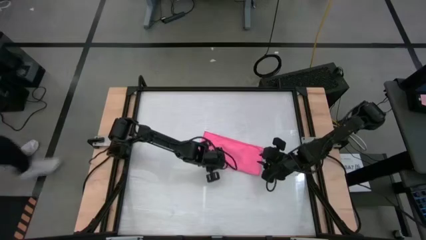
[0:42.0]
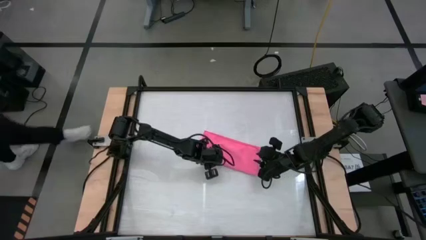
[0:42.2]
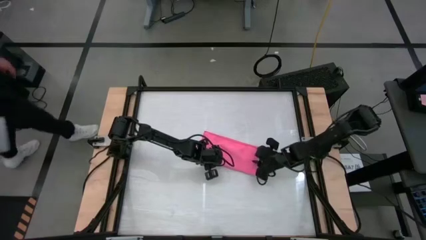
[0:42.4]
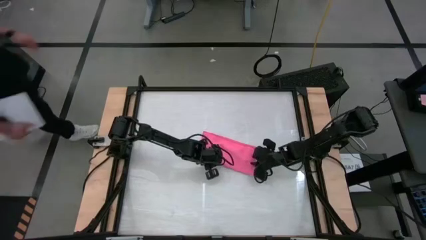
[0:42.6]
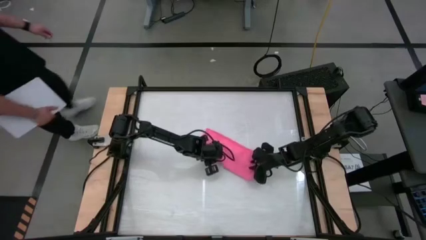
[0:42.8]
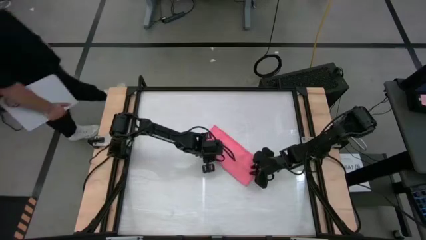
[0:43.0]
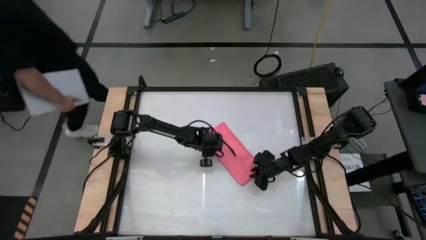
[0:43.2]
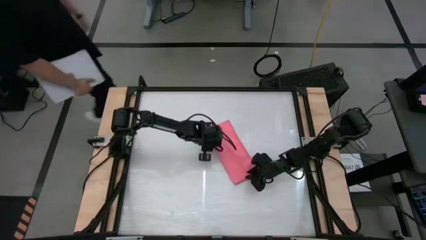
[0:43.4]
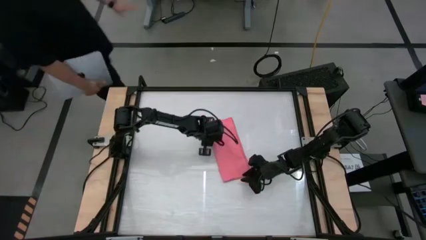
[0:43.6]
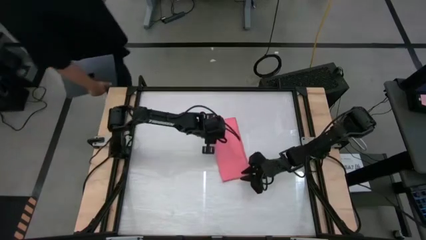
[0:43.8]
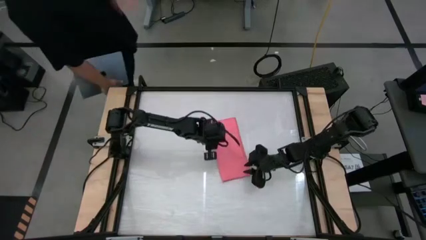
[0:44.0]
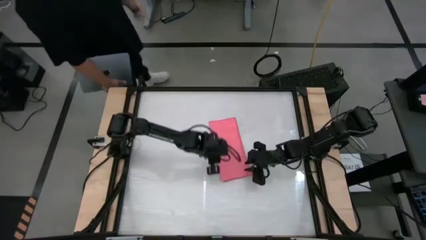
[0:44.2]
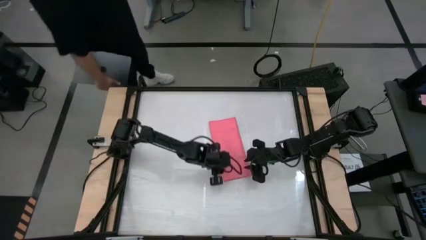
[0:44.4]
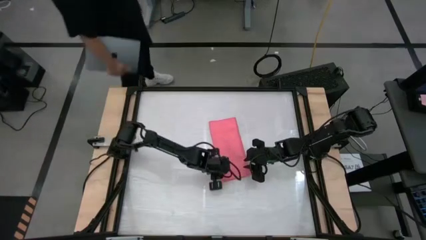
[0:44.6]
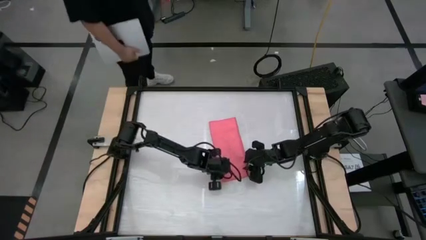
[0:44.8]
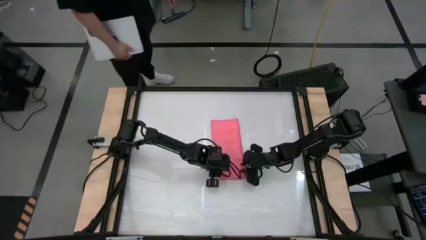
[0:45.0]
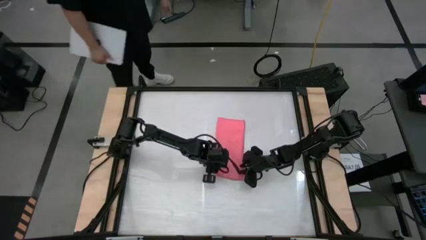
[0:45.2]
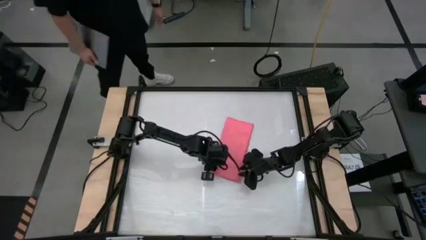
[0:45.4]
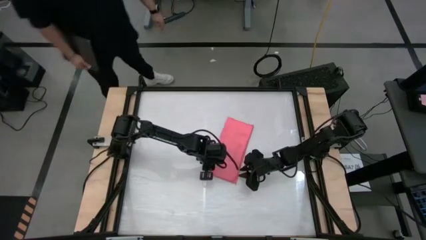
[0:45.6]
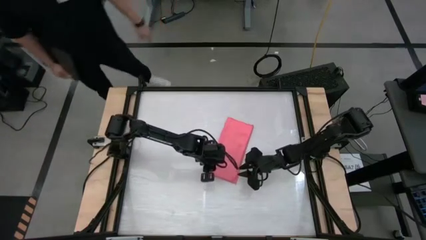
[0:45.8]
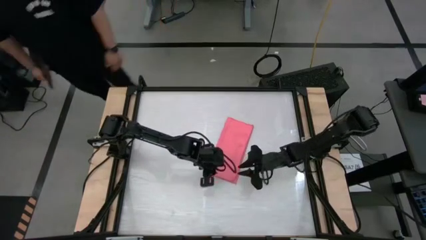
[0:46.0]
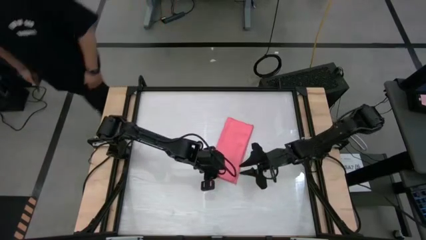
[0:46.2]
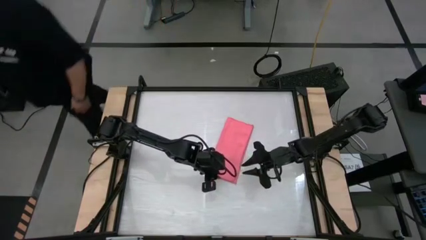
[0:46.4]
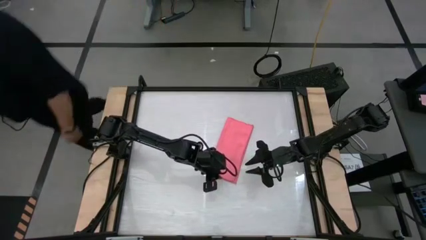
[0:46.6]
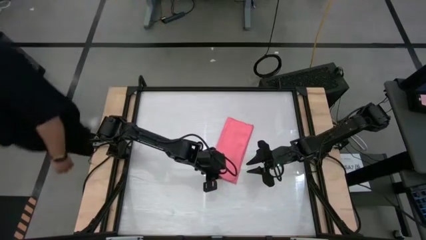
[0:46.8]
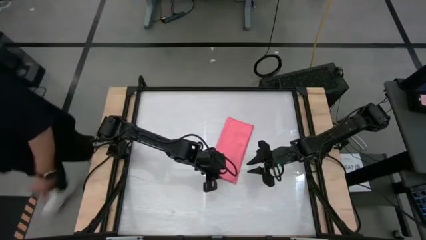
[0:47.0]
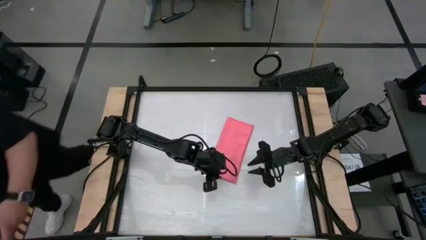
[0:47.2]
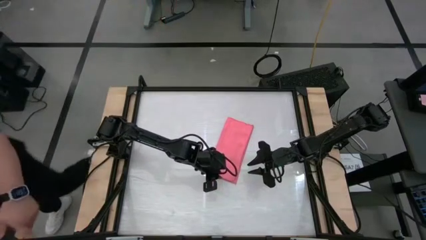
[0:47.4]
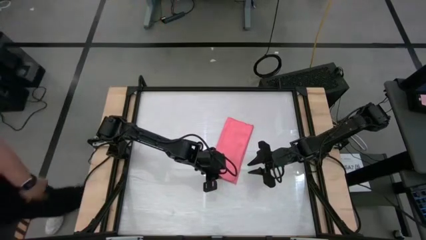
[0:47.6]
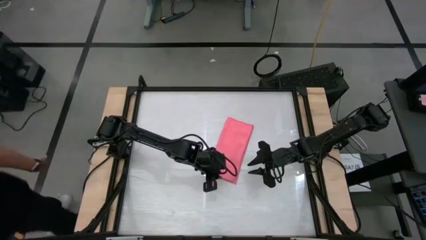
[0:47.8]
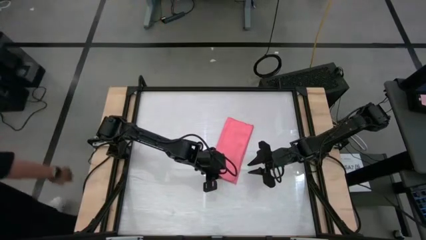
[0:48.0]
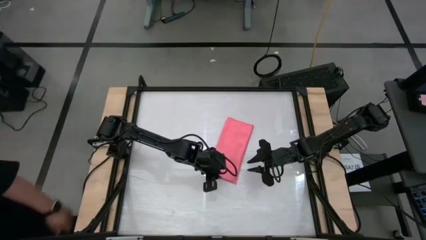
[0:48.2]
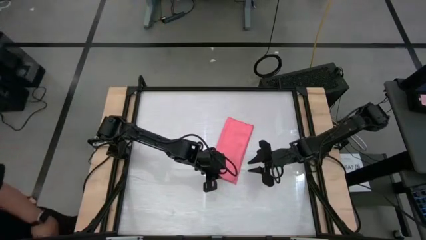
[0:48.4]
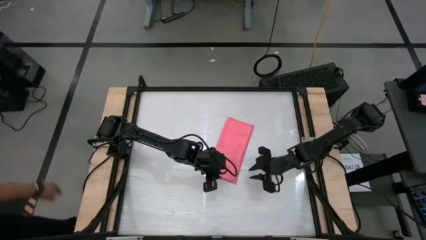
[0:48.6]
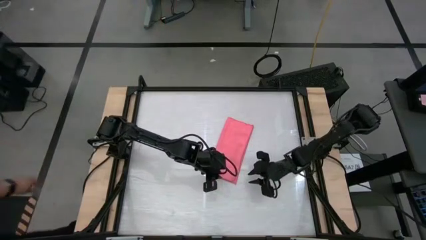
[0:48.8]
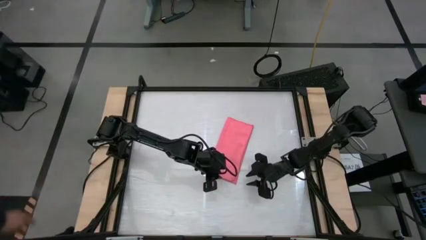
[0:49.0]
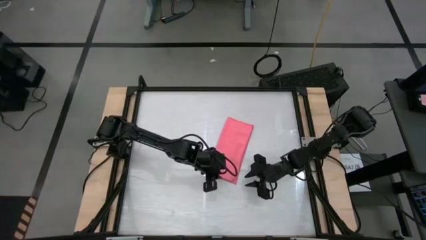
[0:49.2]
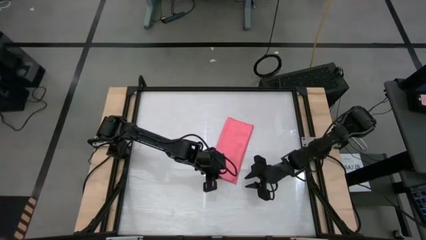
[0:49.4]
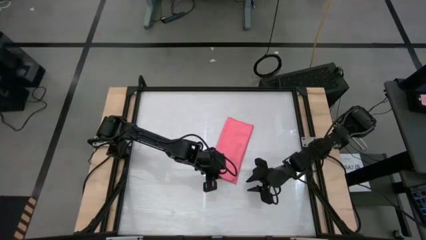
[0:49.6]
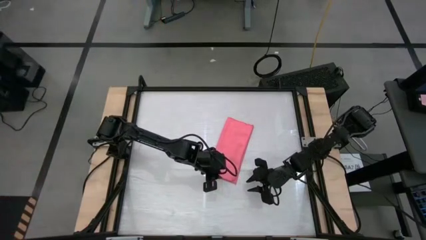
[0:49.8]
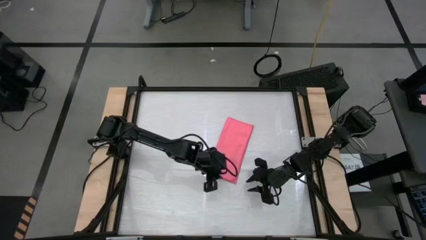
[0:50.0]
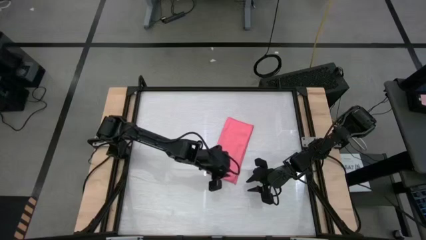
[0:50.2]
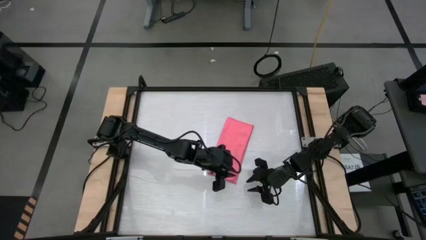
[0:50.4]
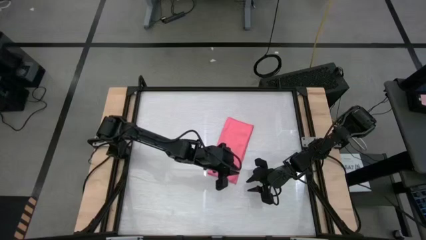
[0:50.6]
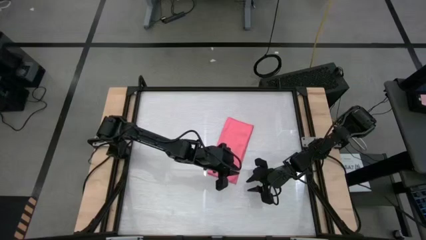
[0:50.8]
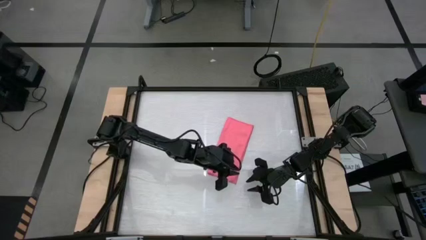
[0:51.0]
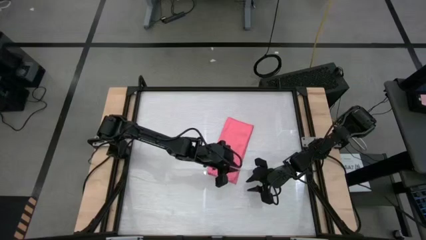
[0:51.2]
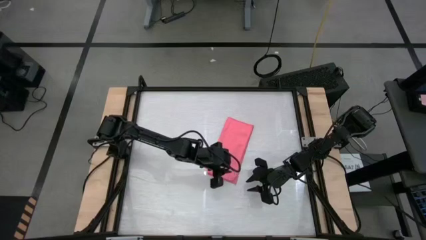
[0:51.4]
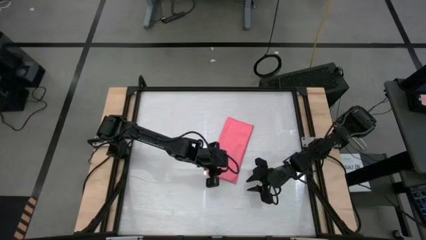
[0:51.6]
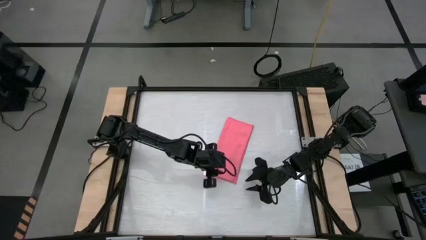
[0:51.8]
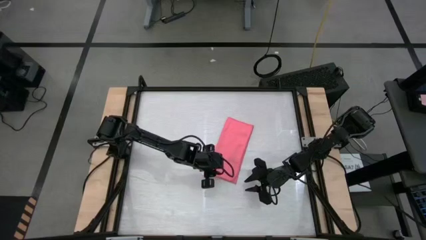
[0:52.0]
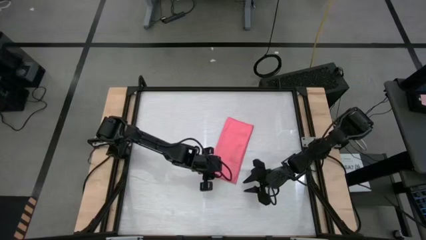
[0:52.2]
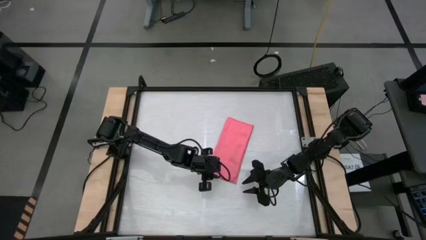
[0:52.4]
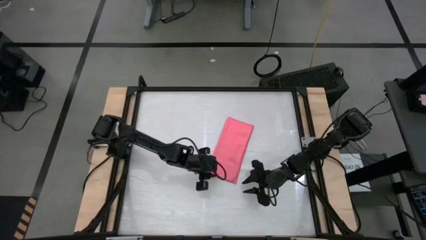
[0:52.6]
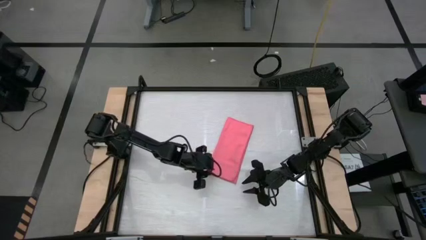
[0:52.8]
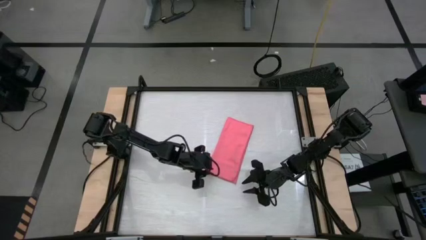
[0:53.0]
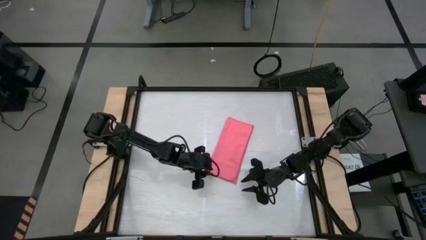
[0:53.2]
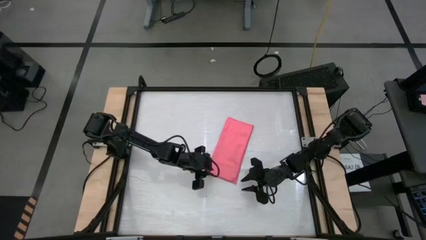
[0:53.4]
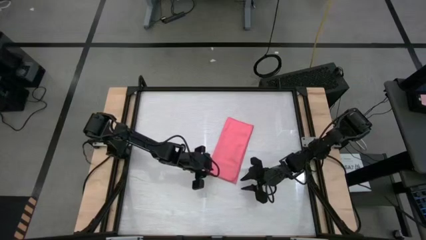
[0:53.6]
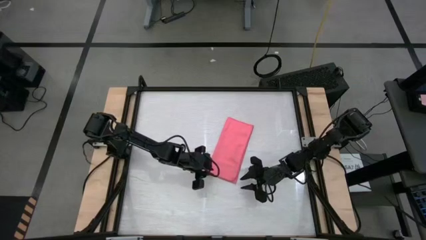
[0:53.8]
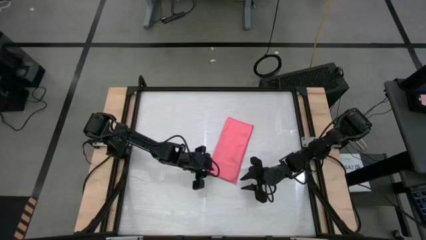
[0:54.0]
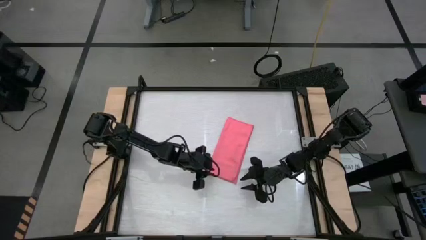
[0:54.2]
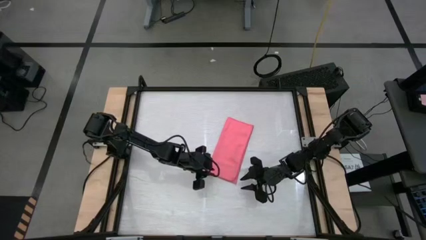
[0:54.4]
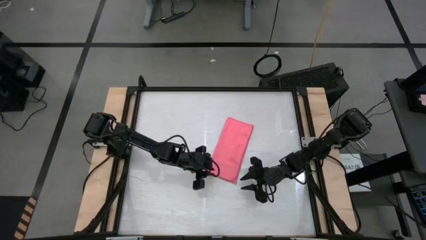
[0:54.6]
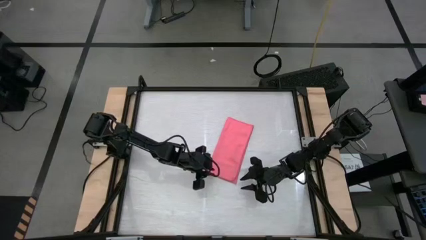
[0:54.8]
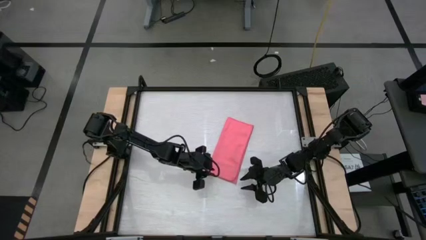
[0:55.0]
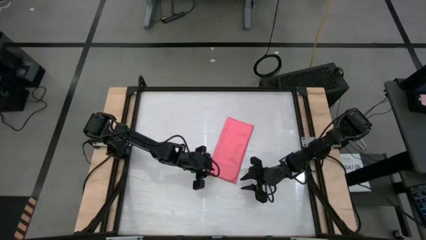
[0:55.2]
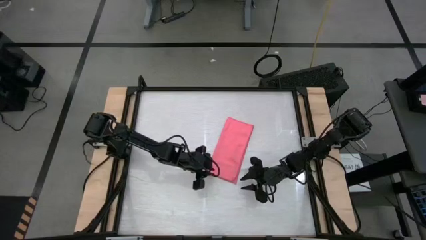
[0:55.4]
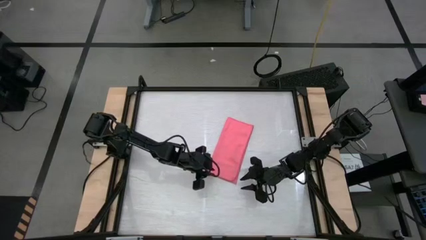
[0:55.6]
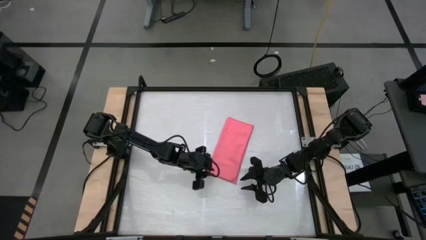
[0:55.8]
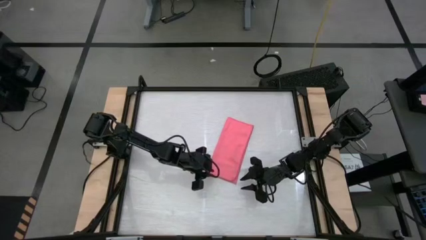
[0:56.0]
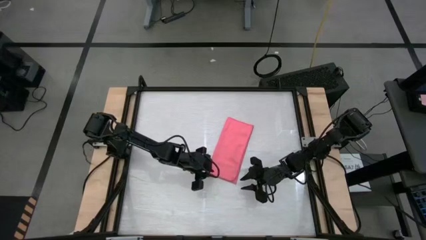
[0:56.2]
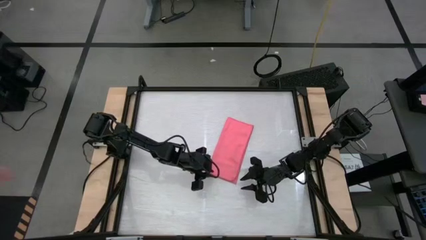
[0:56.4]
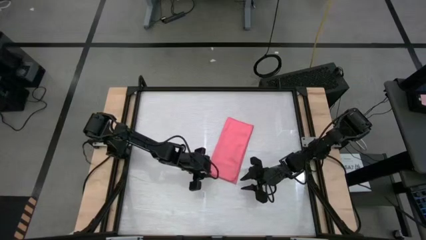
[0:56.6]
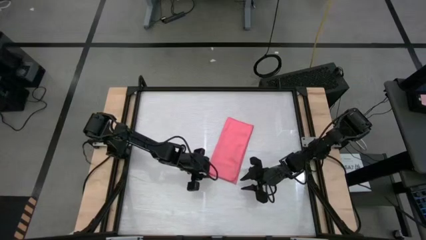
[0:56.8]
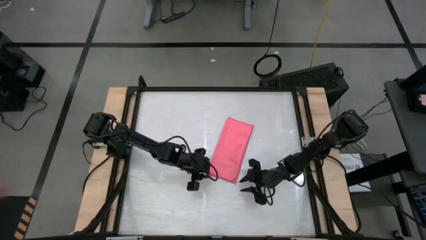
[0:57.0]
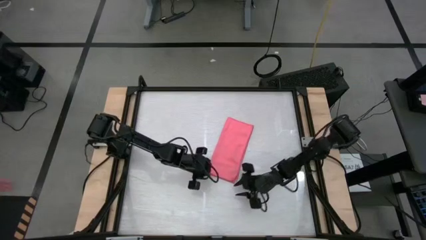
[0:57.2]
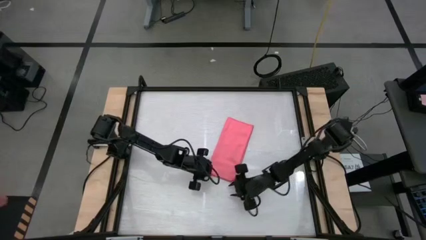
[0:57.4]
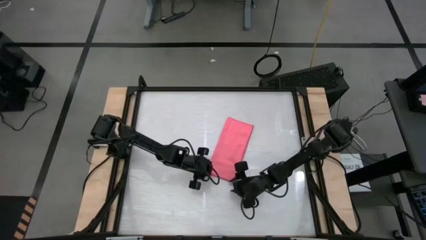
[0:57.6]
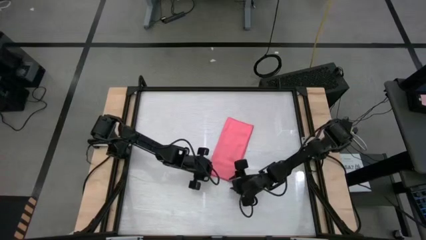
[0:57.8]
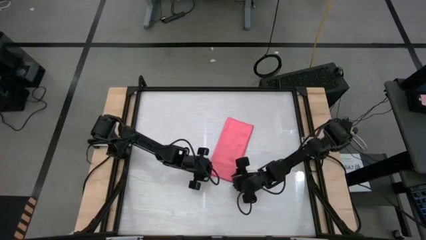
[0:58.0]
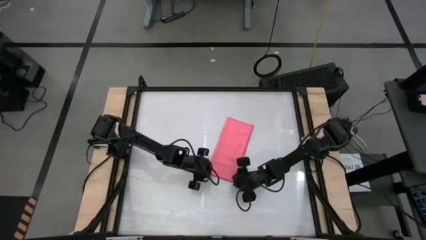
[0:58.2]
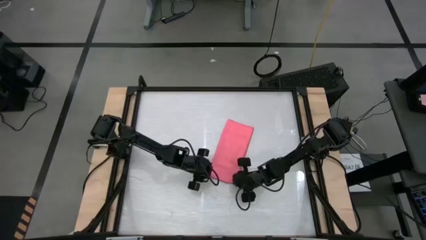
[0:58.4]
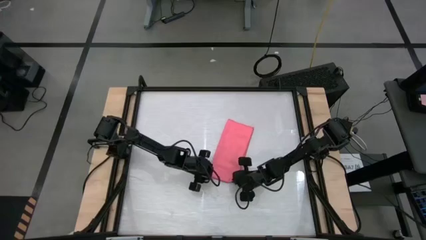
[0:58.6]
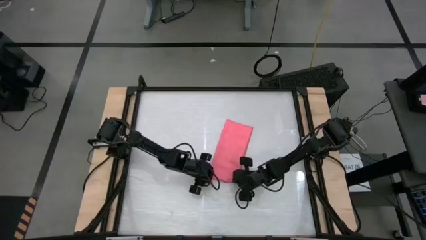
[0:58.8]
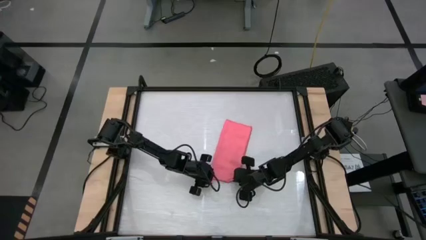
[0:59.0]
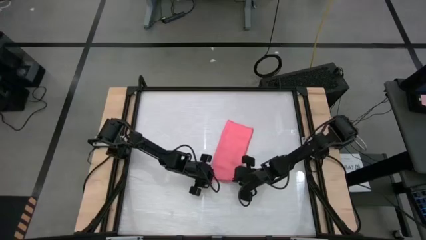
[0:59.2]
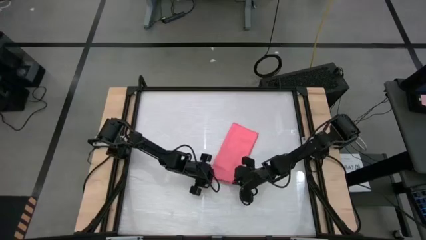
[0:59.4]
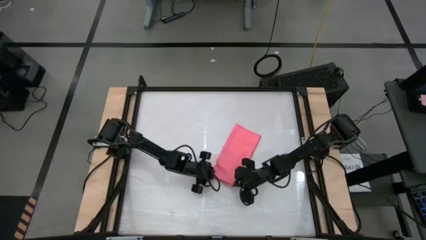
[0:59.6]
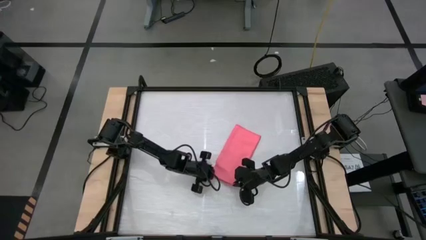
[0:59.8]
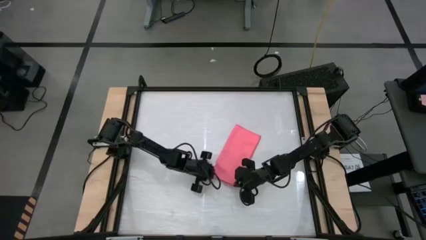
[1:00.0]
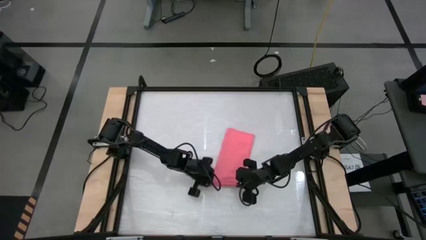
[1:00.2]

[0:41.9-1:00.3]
Task: Roll towel
Fold the pink towel
